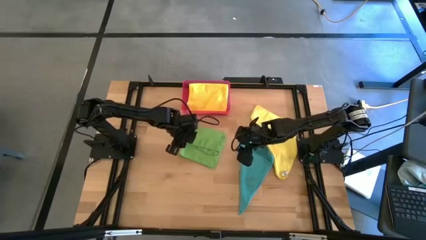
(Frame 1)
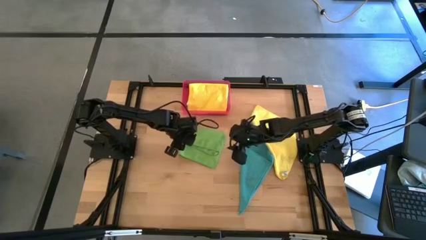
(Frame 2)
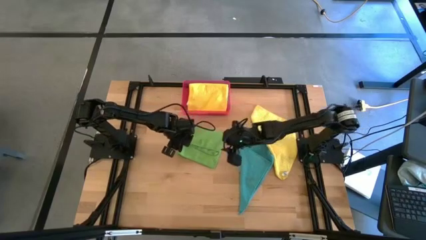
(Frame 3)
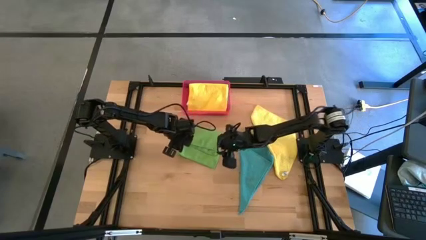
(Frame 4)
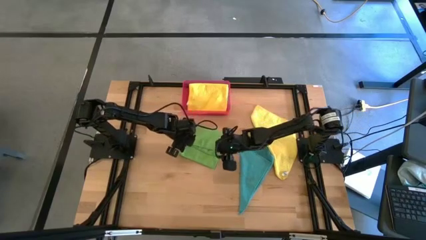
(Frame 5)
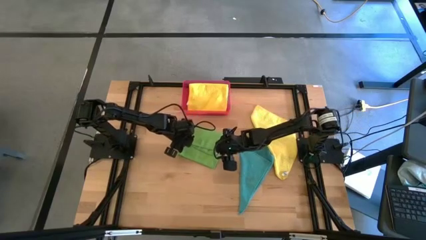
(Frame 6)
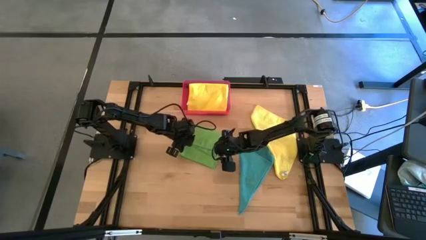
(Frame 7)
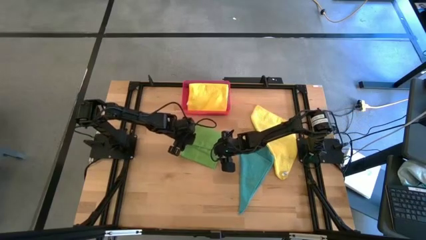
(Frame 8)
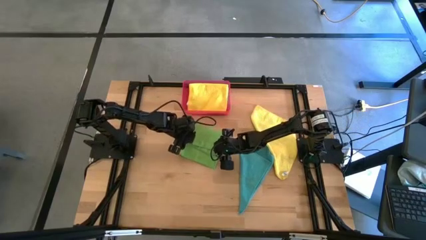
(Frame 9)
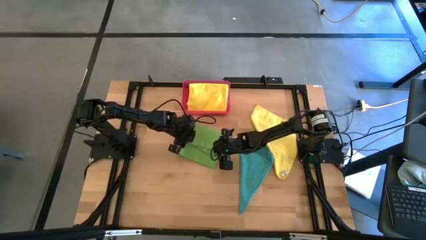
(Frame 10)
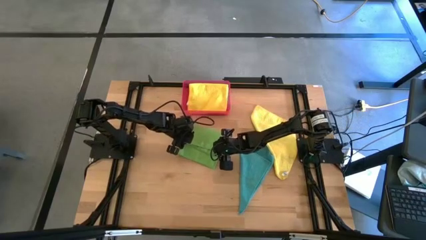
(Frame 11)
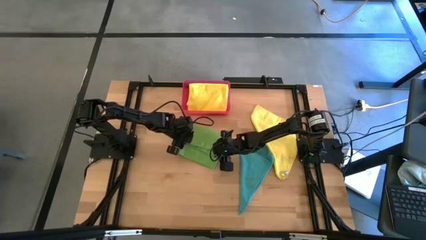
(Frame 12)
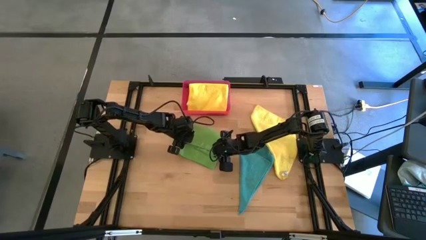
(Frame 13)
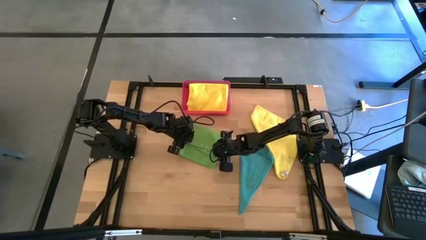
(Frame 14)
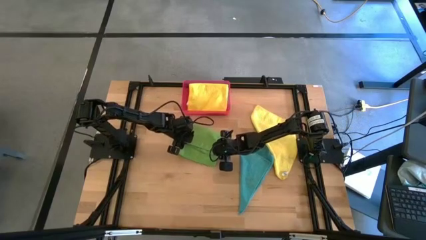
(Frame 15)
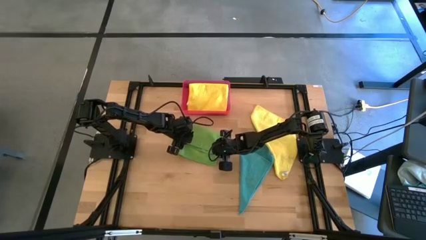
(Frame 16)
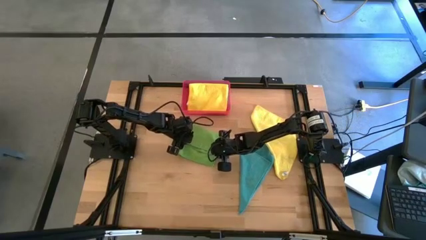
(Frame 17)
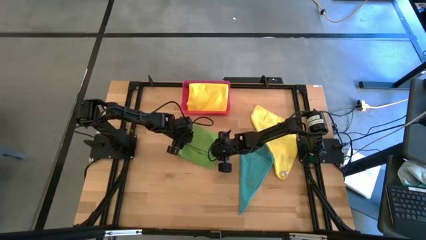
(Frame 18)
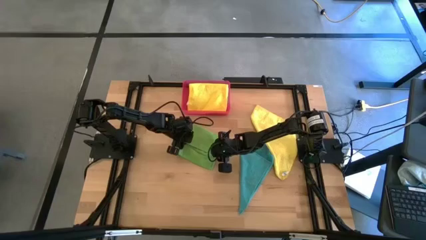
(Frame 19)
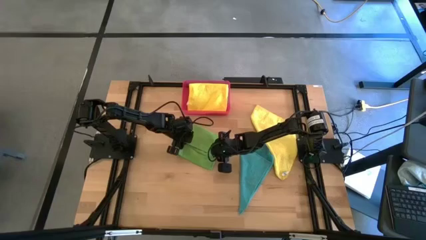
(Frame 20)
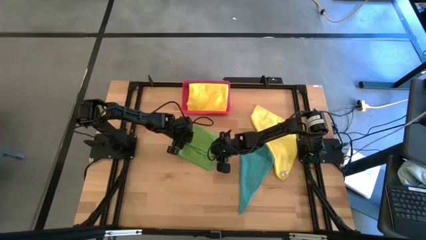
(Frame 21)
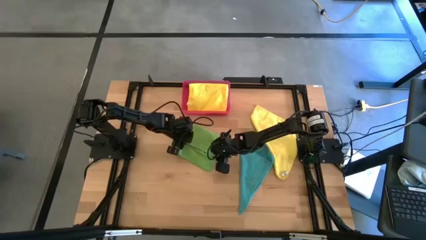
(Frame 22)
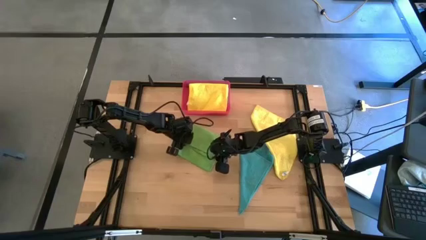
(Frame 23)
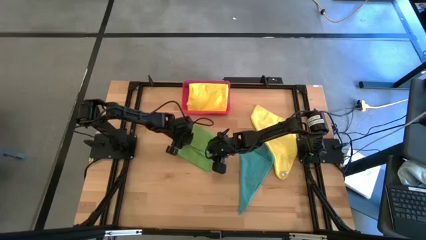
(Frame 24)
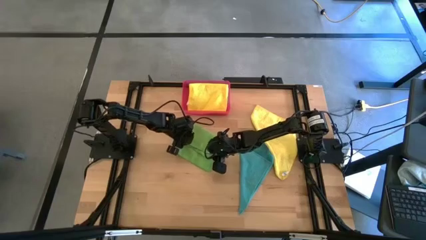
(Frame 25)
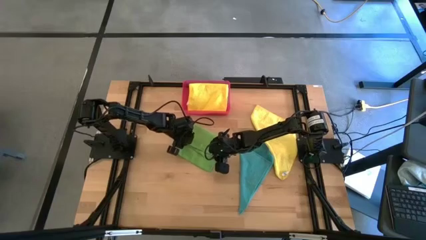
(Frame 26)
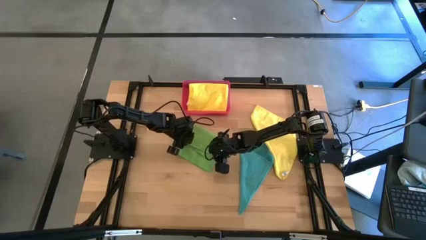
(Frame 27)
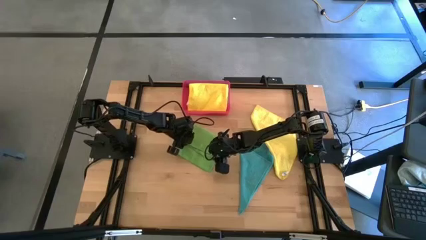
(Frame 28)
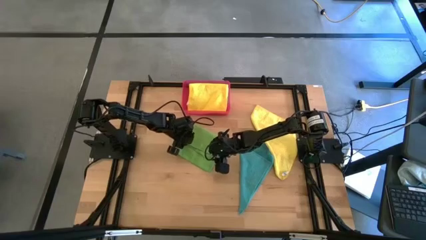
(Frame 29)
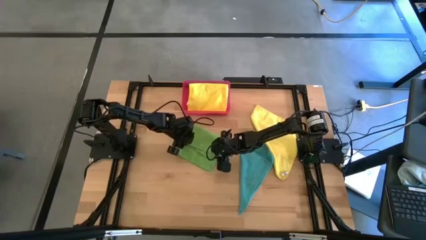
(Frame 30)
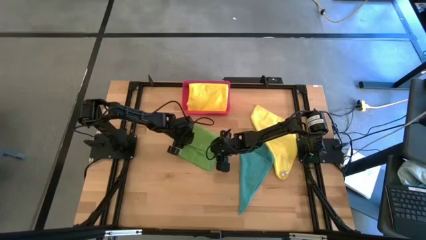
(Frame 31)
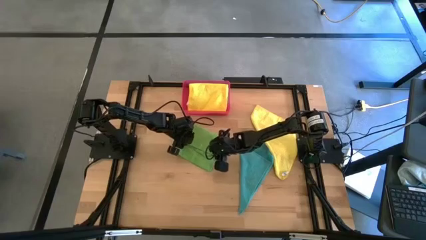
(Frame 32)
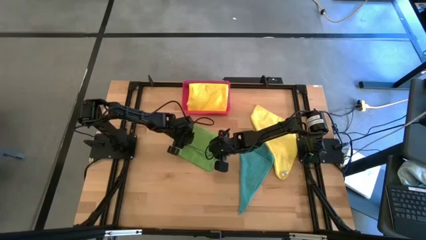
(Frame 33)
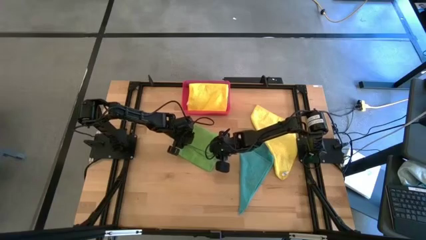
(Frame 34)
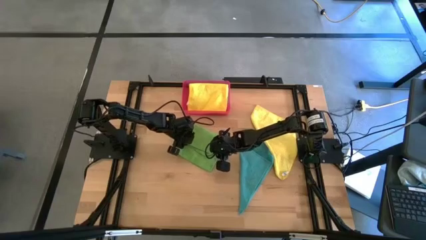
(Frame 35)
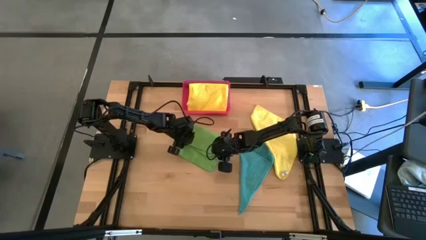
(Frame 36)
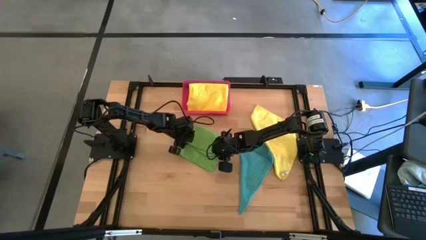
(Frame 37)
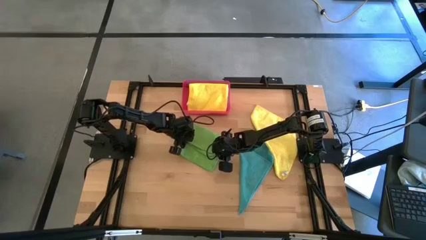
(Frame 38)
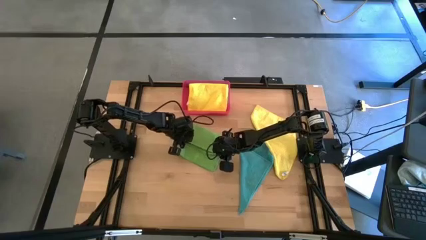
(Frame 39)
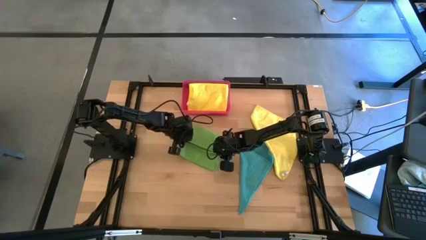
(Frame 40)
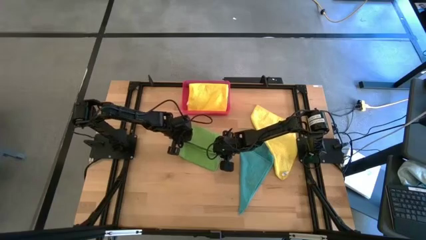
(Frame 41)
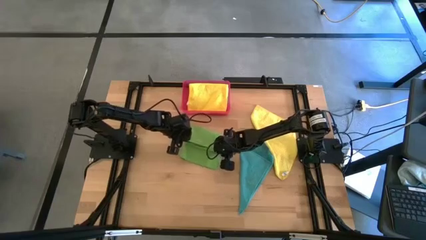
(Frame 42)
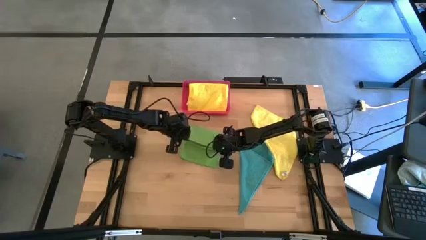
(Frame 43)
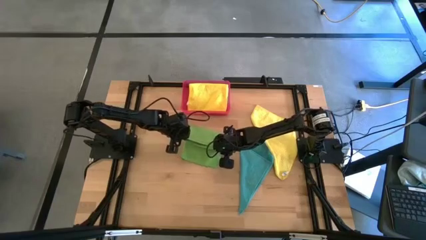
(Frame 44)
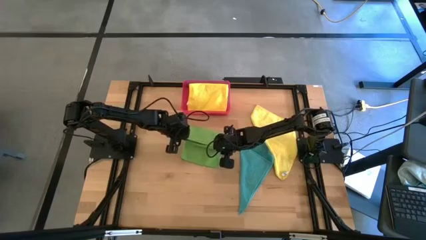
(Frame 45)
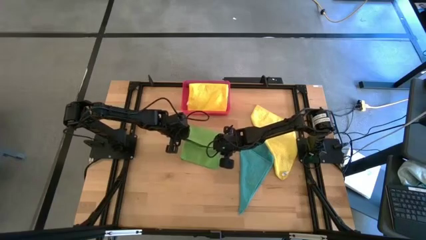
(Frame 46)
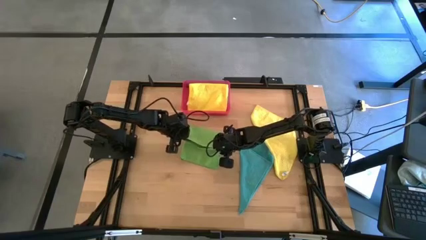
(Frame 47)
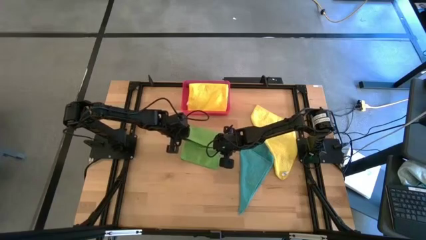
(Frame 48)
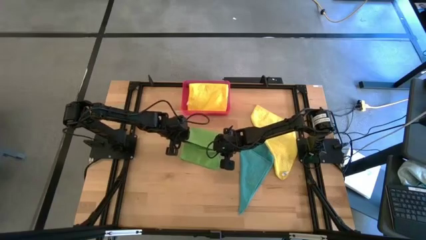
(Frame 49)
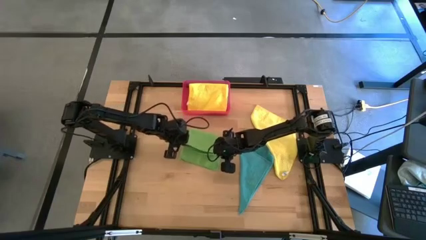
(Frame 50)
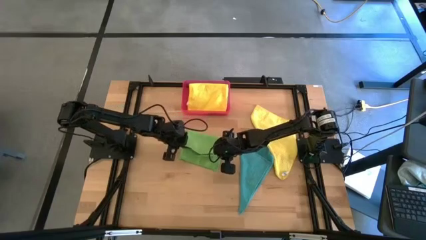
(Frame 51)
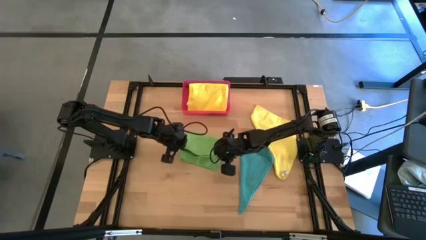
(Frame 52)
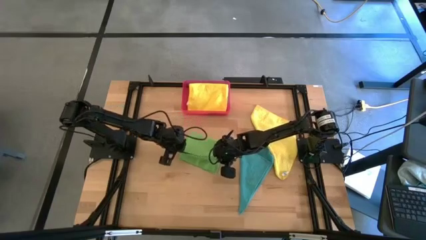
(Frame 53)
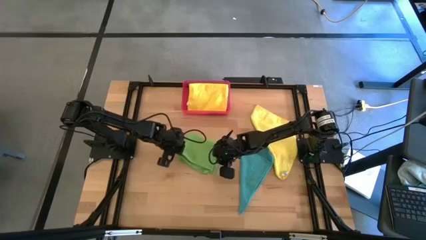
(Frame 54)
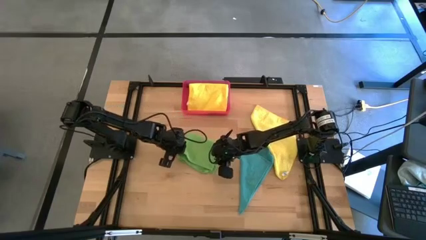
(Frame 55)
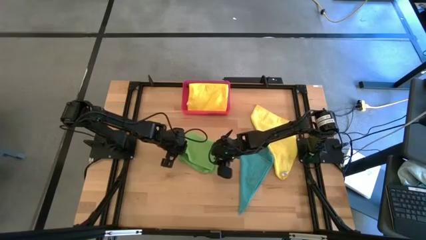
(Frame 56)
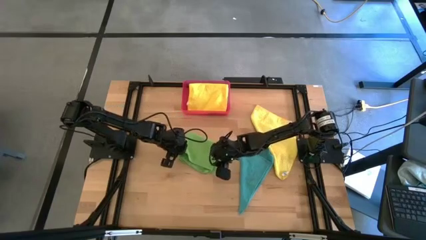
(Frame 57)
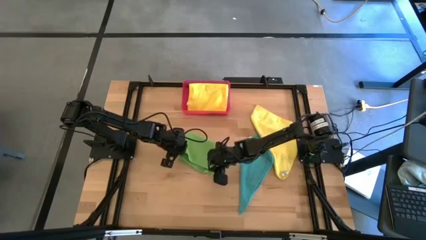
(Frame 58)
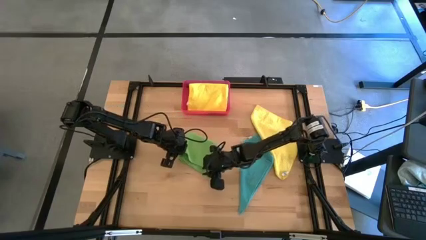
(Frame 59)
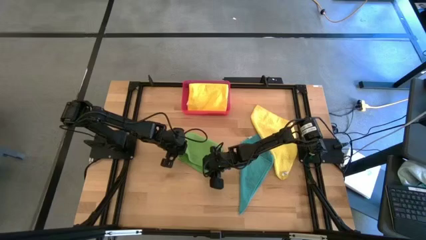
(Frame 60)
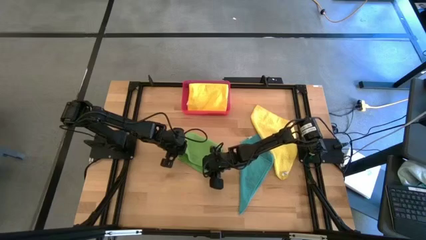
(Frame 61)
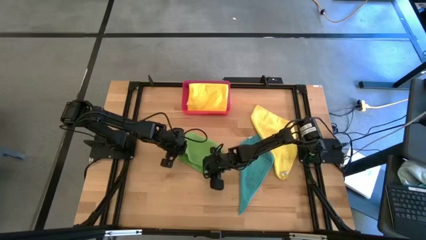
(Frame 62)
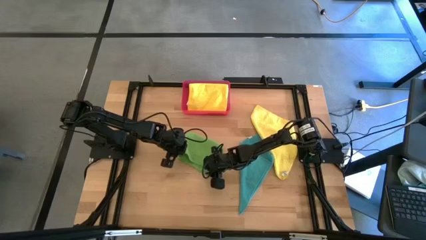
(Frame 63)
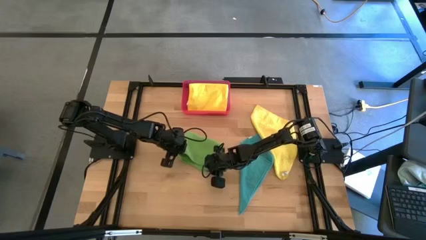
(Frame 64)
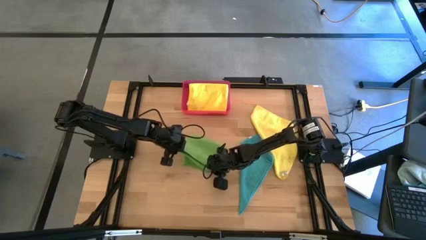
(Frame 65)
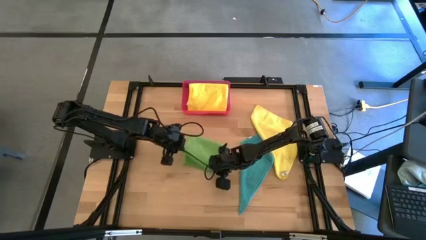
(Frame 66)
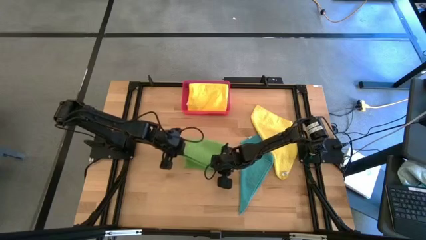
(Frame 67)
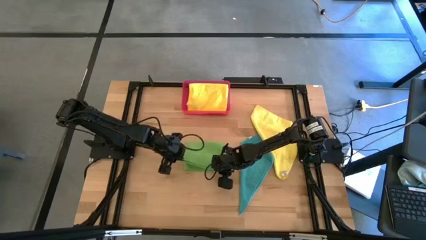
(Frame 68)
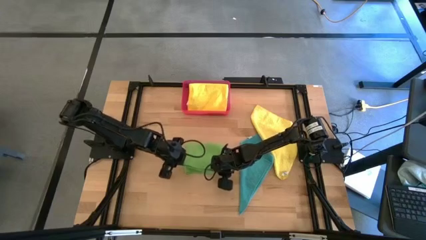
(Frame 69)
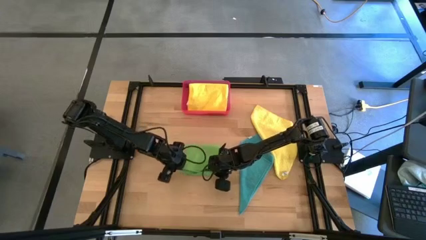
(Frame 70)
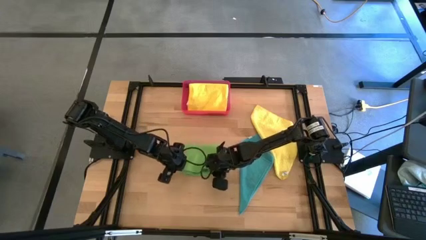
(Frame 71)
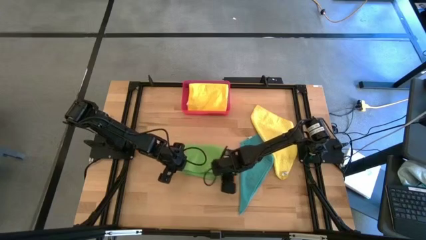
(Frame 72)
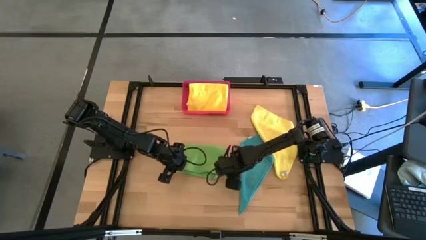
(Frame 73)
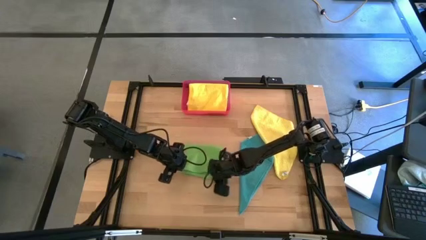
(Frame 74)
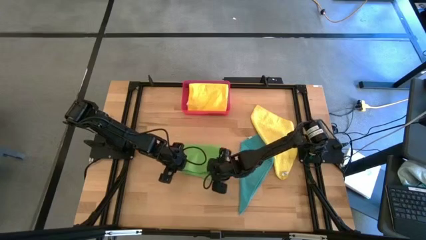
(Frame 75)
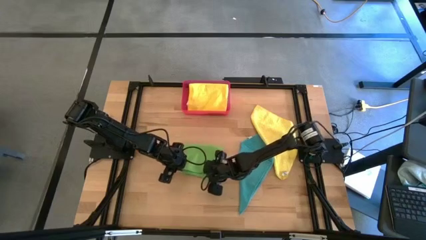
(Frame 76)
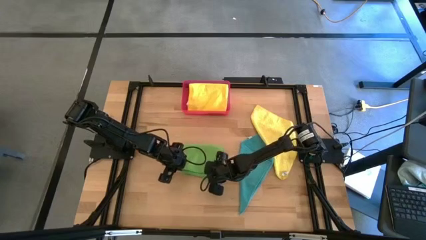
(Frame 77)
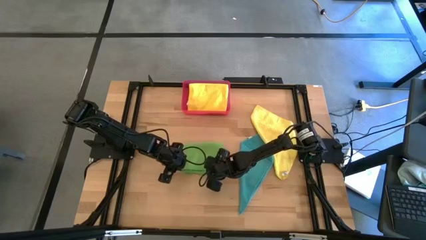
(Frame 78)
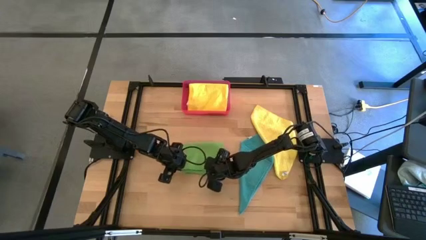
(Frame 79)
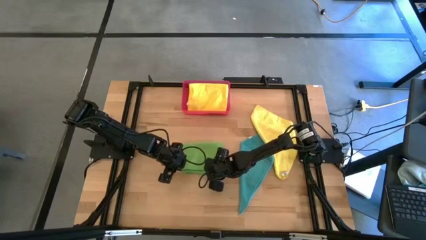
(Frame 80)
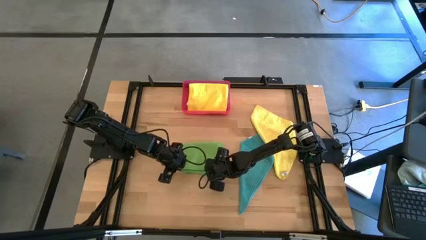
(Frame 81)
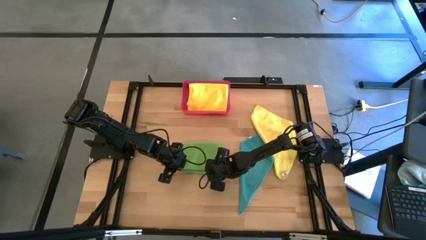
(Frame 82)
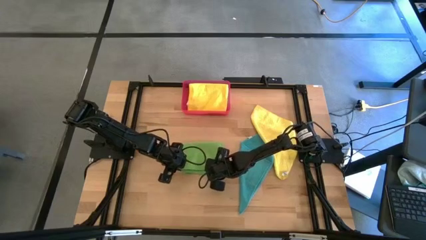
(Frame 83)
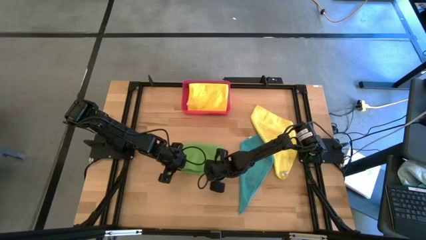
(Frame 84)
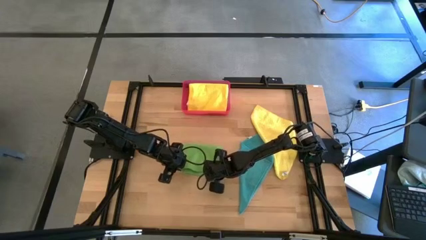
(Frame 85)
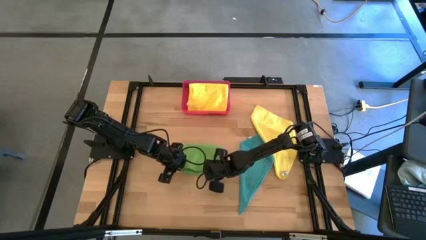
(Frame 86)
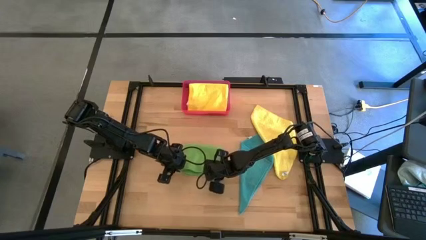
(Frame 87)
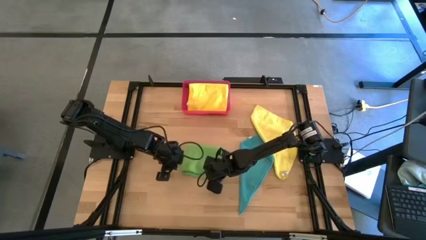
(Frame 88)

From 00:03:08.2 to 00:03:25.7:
Task: Fold microfiber towels
Fold the green microfiber cloth
